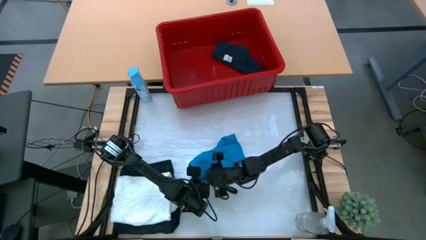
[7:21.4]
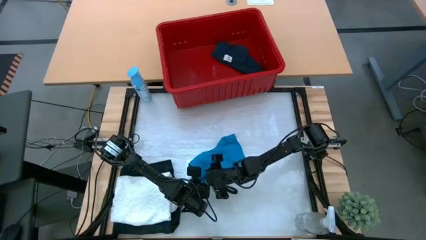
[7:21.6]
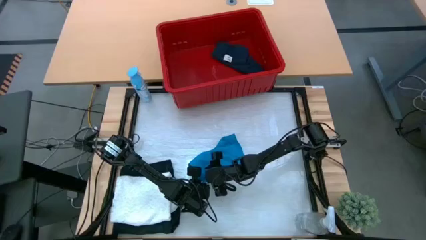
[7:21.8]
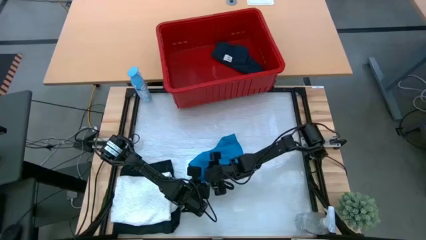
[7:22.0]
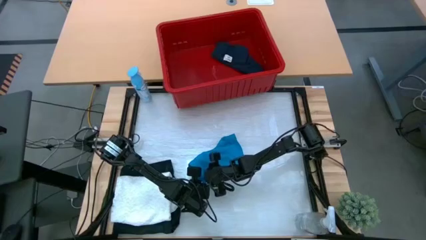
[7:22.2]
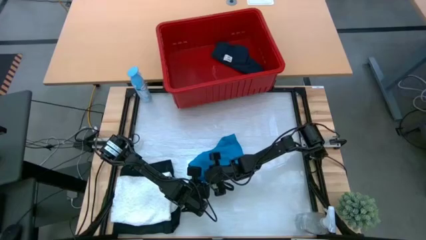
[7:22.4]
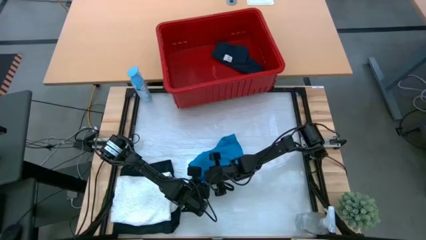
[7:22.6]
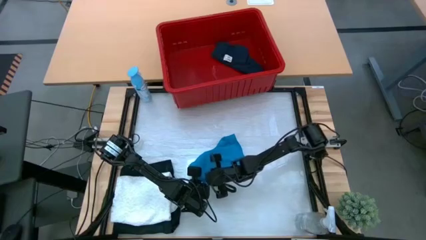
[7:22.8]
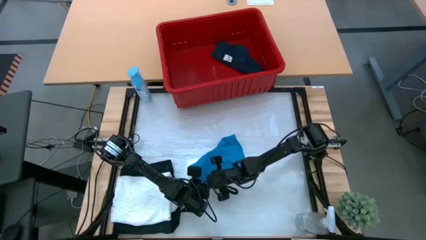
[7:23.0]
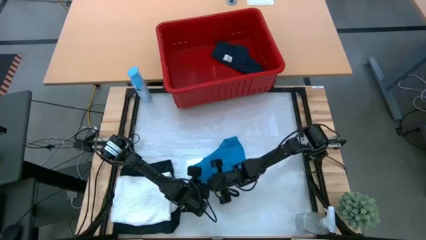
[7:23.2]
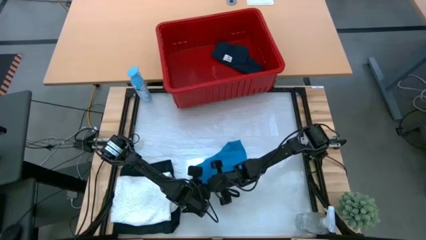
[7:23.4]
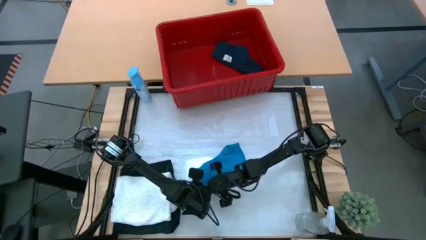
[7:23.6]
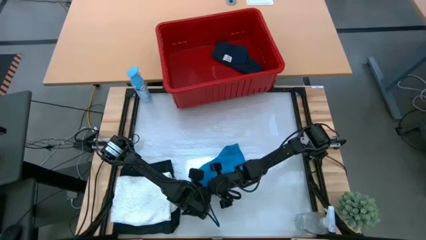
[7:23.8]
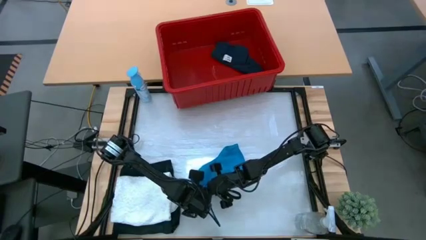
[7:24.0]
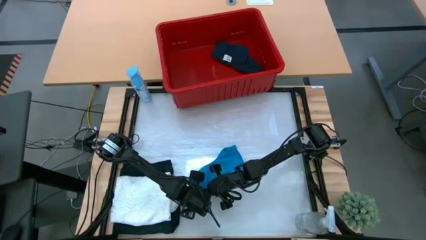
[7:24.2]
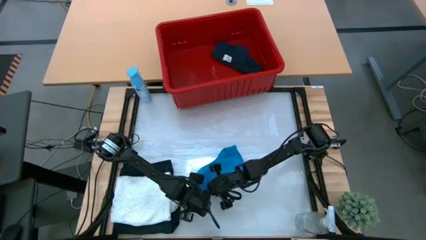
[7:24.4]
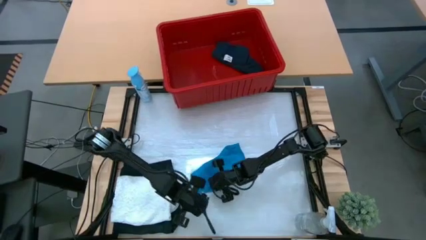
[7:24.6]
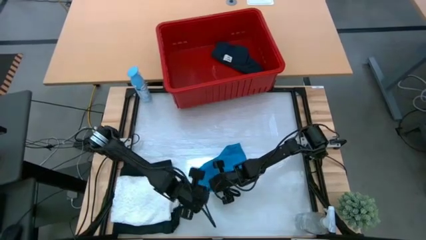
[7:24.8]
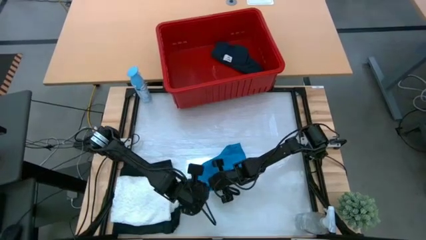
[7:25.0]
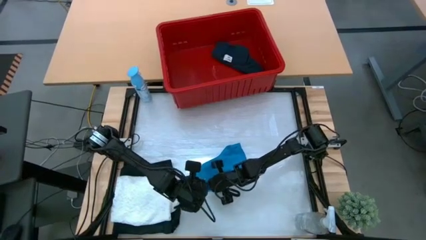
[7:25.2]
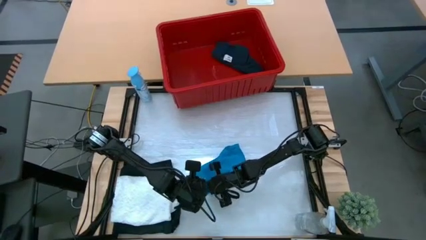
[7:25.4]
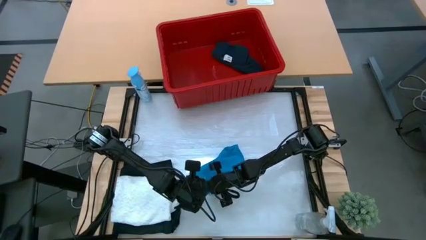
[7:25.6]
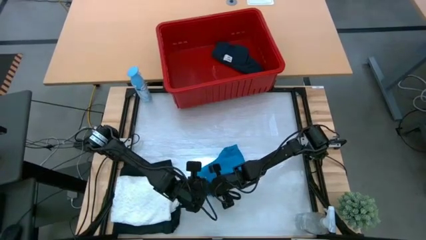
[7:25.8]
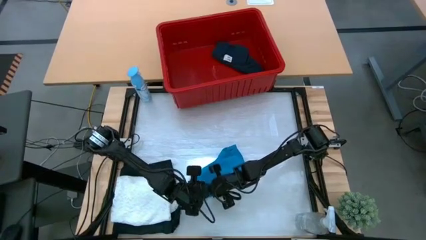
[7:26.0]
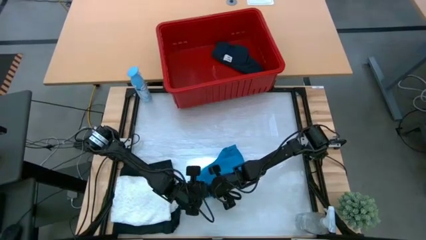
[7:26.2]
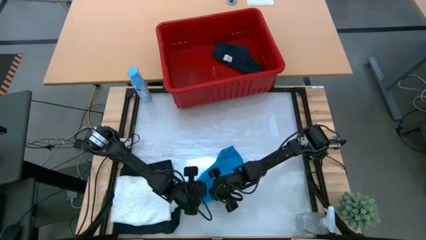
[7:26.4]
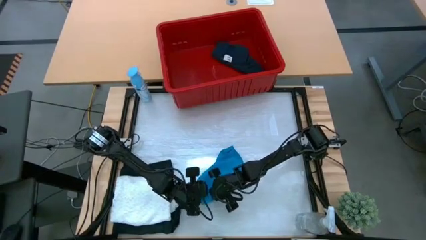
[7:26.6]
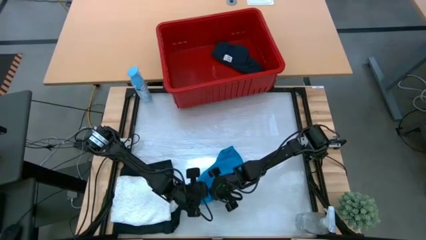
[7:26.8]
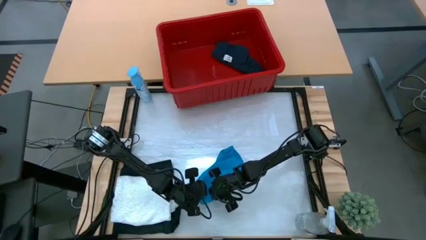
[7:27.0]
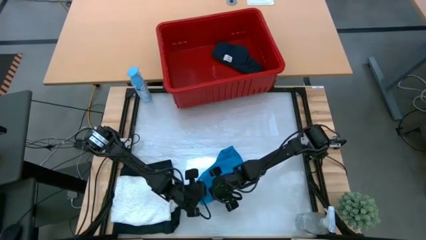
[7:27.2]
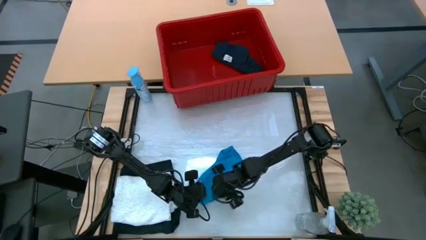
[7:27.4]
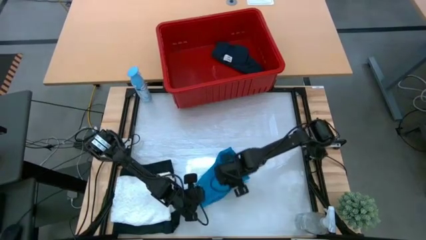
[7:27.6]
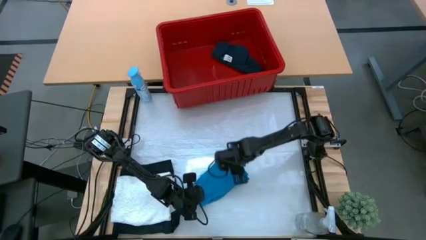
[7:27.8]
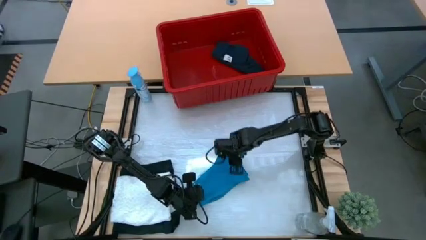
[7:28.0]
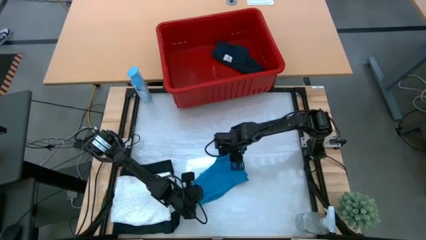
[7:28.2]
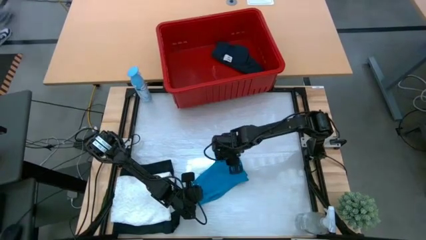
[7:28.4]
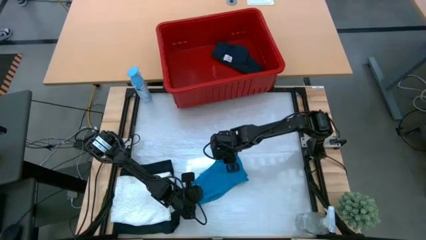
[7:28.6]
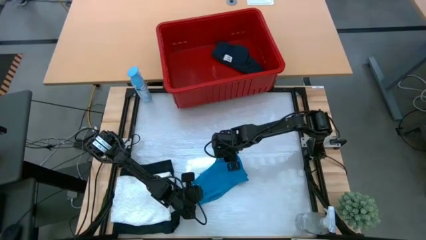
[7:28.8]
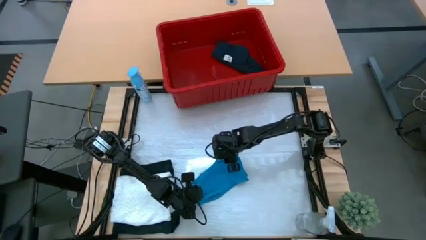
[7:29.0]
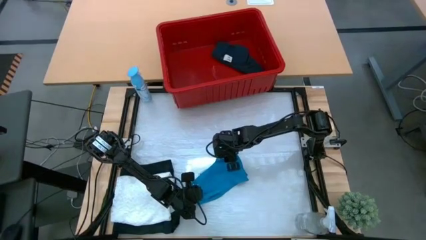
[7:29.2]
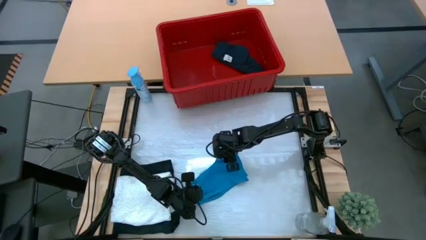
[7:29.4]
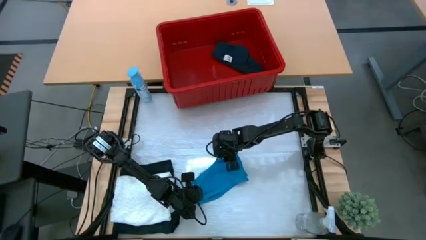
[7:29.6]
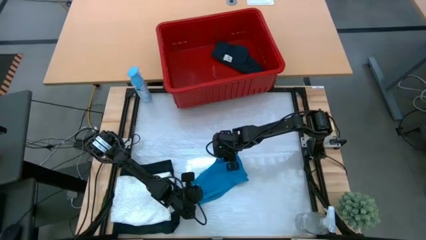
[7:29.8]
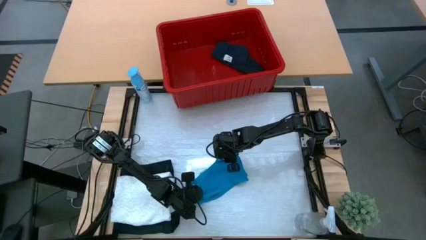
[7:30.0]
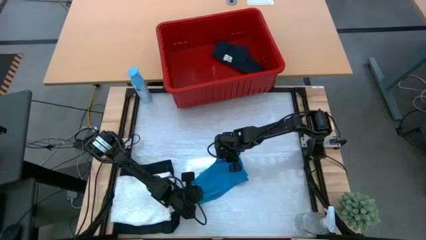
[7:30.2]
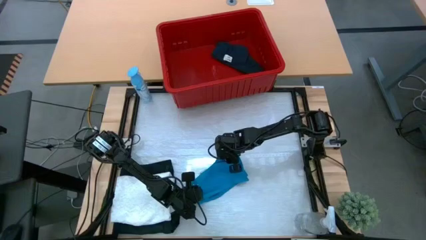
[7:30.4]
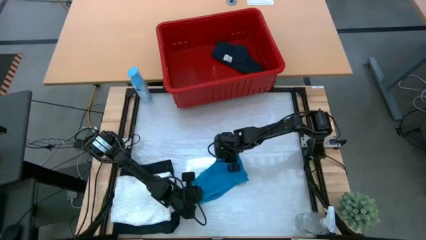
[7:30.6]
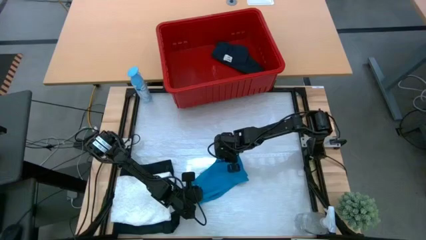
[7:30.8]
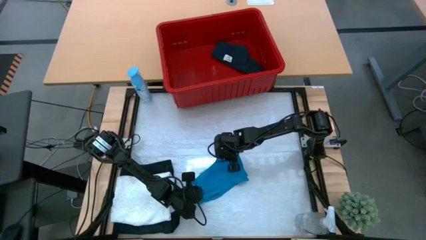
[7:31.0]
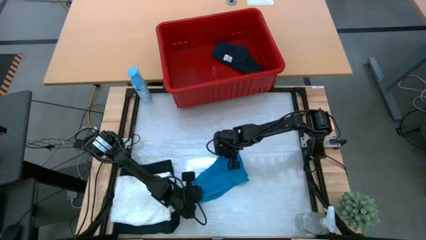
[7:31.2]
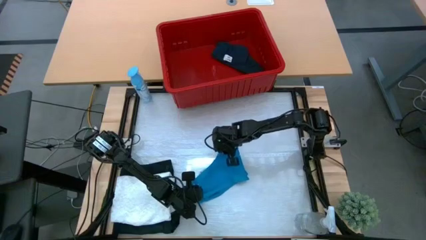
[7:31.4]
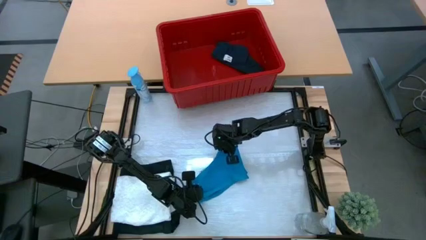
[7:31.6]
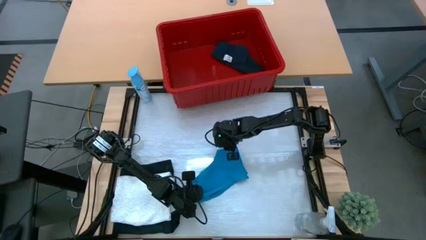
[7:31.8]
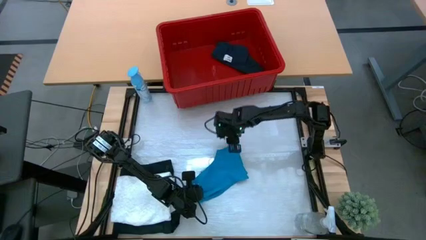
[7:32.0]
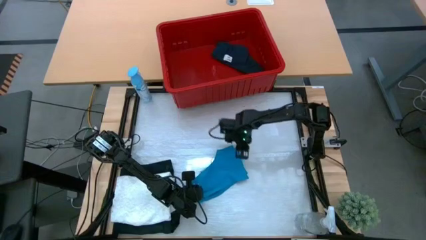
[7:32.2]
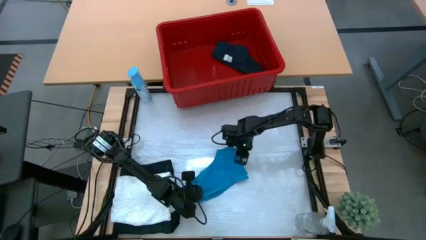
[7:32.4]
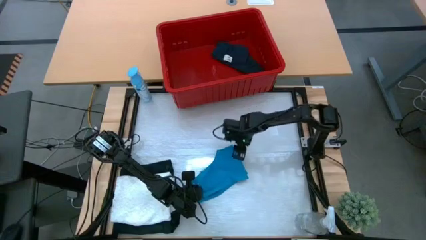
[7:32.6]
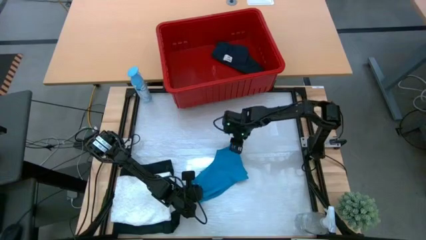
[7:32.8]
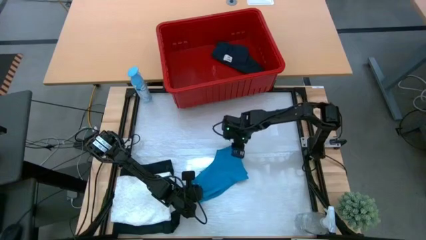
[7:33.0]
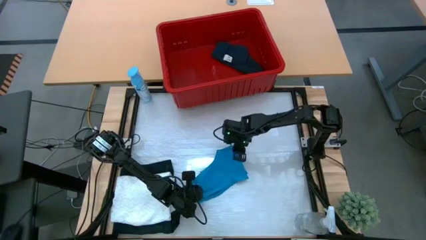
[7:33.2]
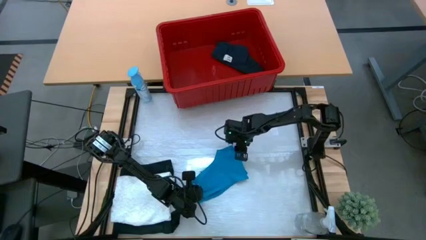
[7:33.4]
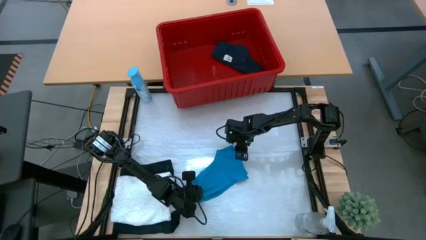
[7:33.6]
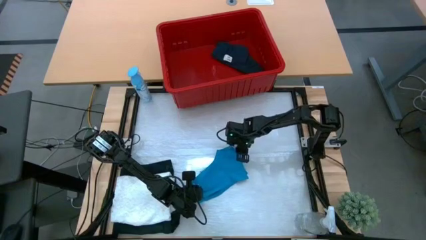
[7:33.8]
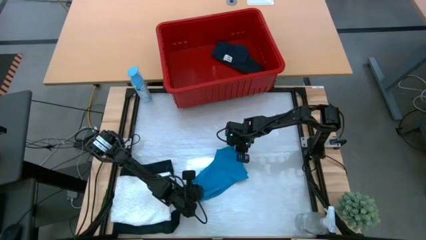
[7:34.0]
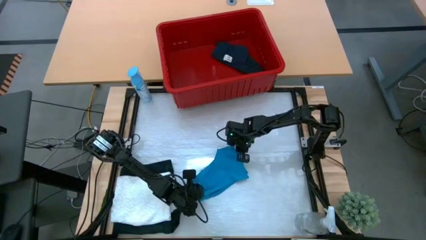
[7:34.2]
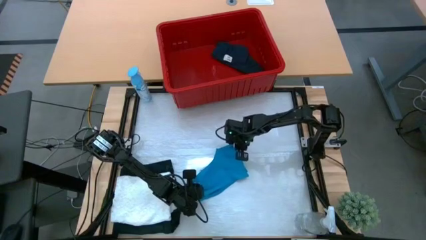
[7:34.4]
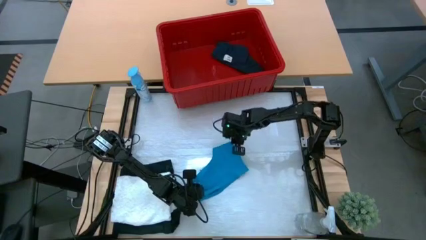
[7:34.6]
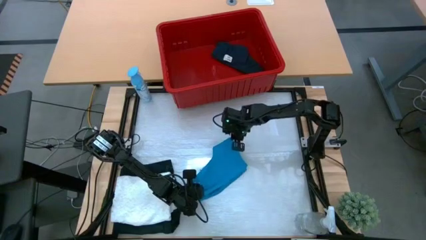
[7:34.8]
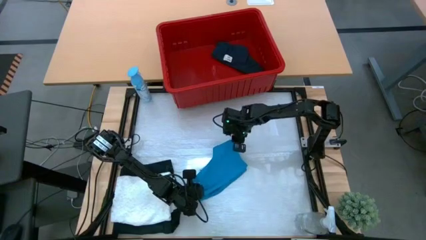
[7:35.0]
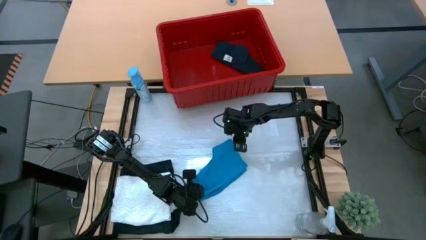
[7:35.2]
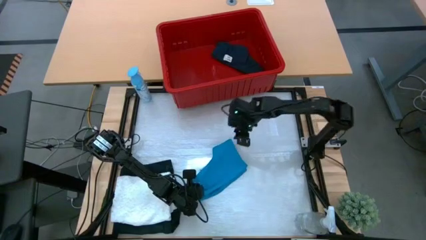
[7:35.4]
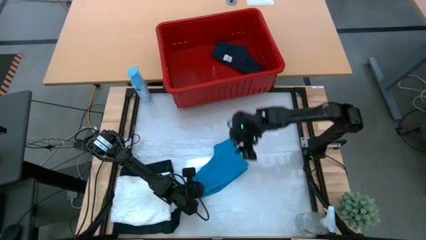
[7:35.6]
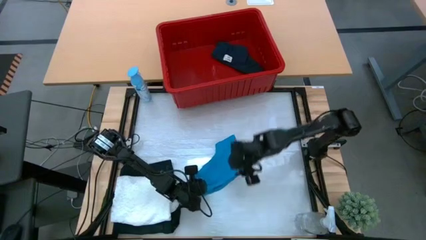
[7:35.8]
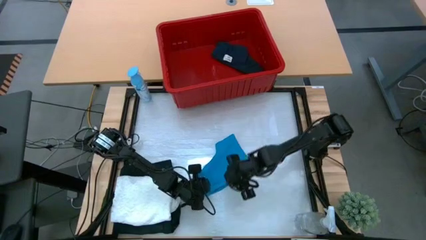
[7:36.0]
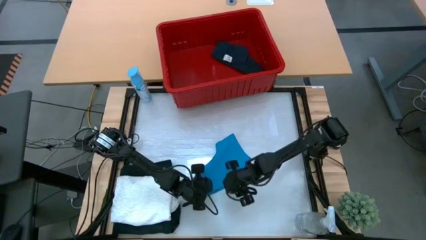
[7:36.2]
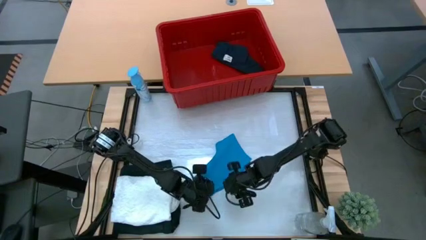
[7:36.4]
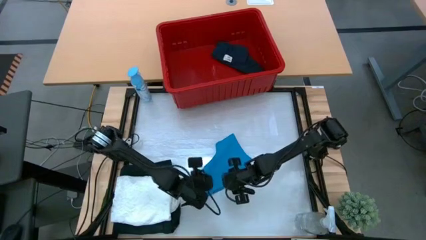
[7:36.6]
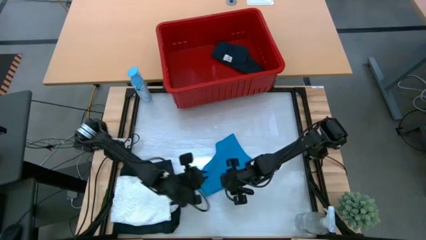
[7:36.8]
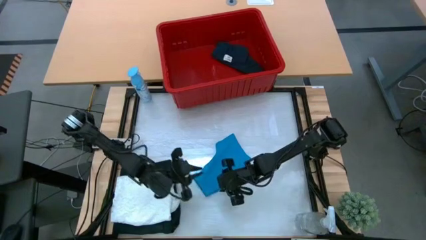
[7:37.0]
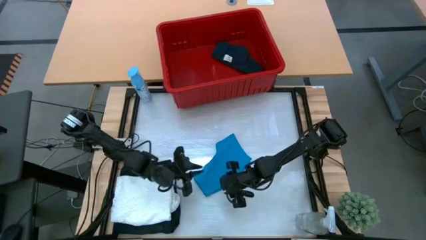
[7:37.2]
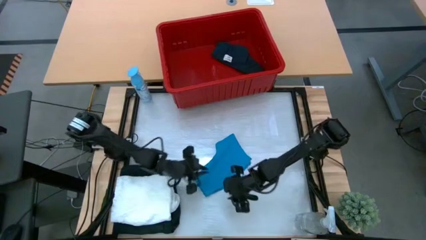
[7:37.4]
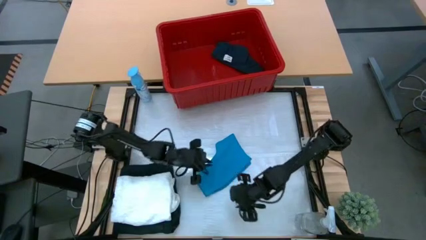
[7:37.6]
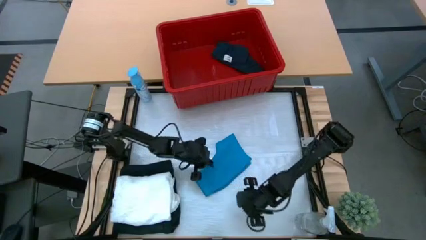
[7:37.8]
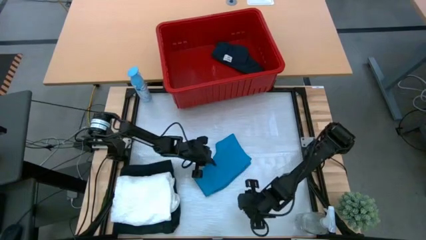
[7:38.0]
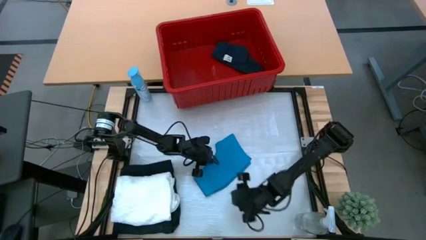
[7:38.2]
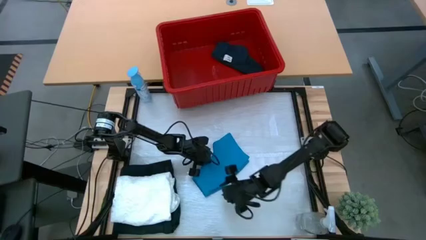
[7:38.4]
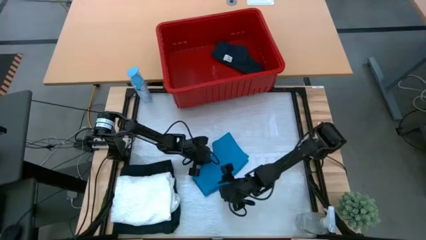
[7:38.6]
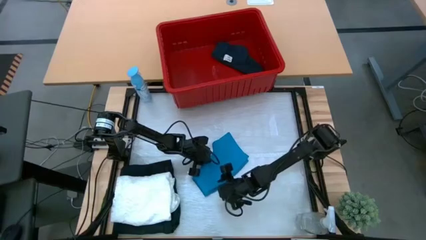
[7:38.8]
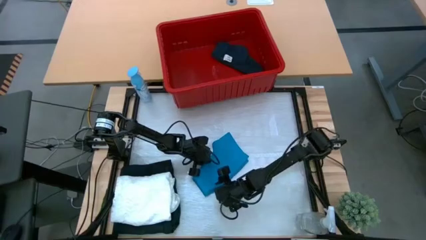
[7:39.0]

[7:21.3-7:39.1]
Task: Fold Laundry from Bin
Fold the blue shorts from the red bin
